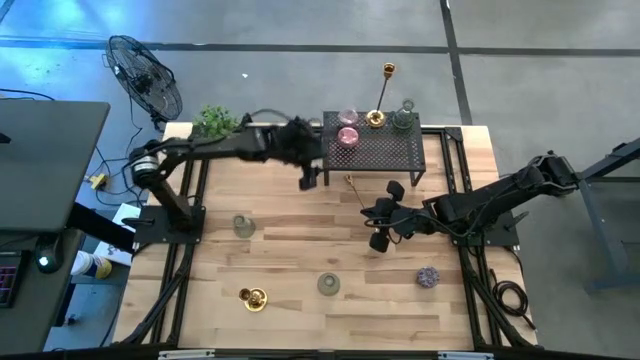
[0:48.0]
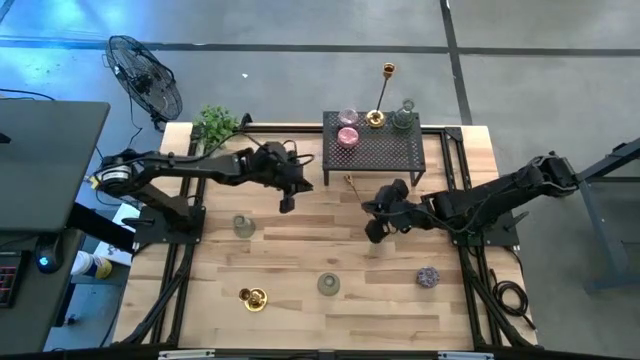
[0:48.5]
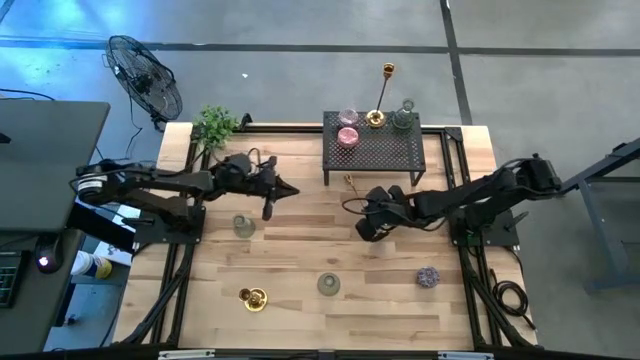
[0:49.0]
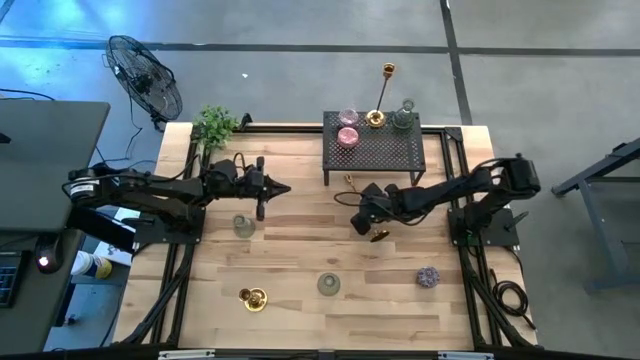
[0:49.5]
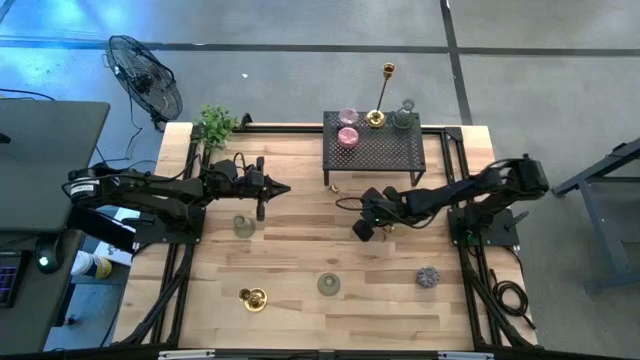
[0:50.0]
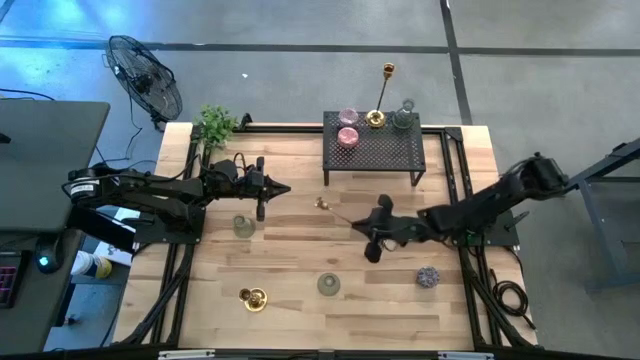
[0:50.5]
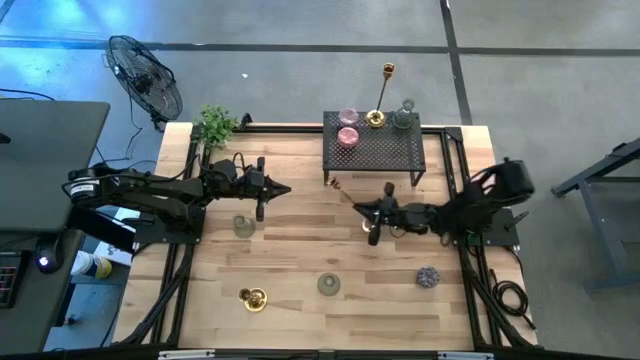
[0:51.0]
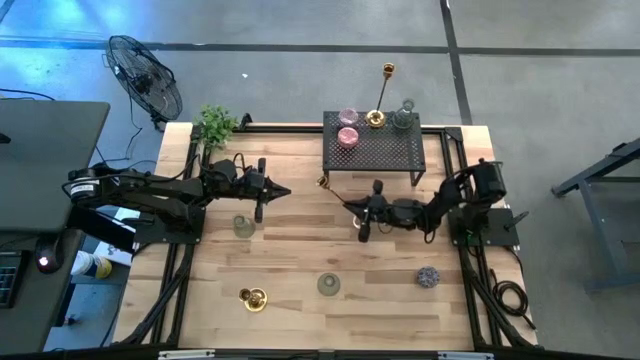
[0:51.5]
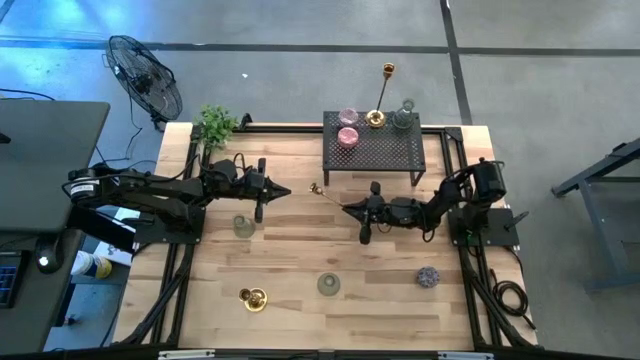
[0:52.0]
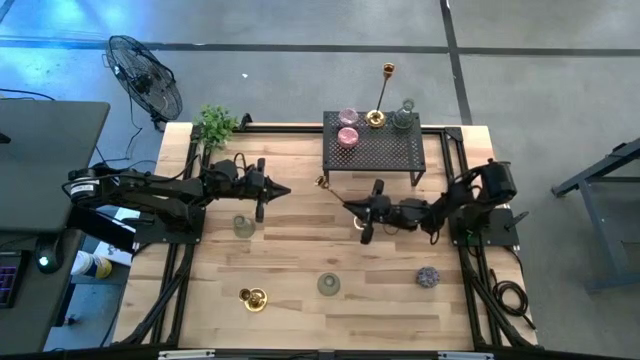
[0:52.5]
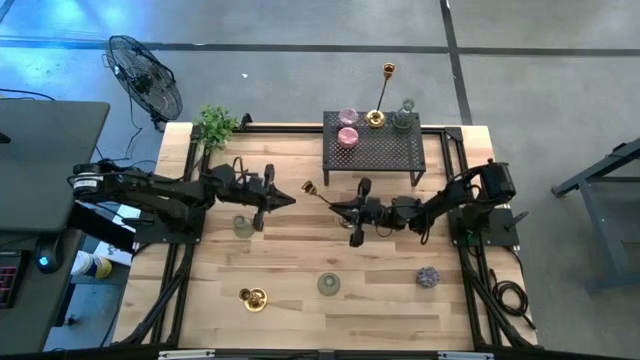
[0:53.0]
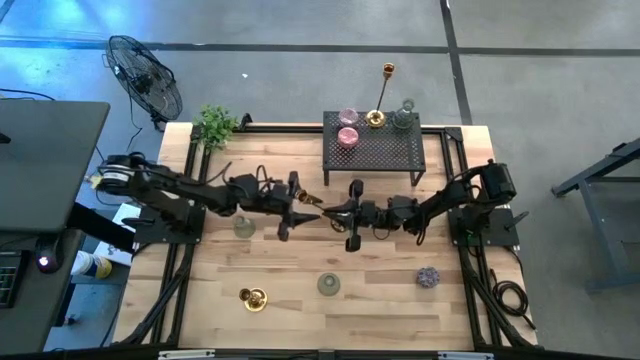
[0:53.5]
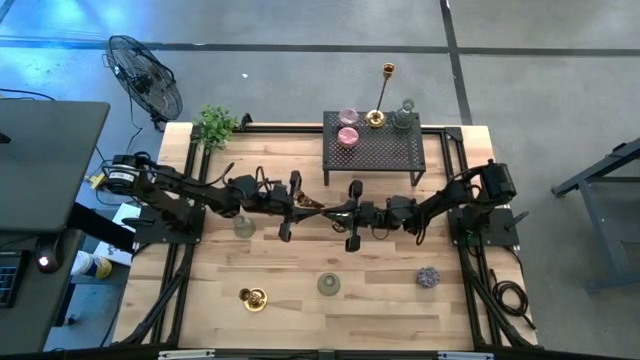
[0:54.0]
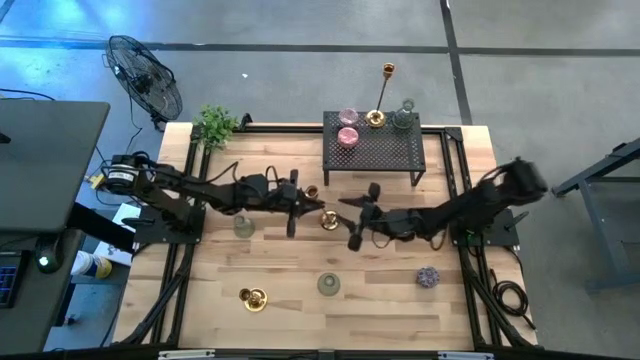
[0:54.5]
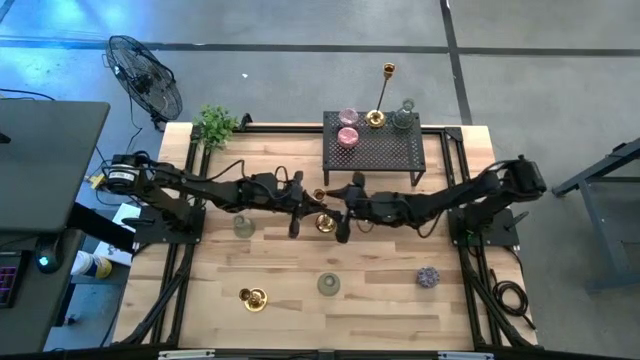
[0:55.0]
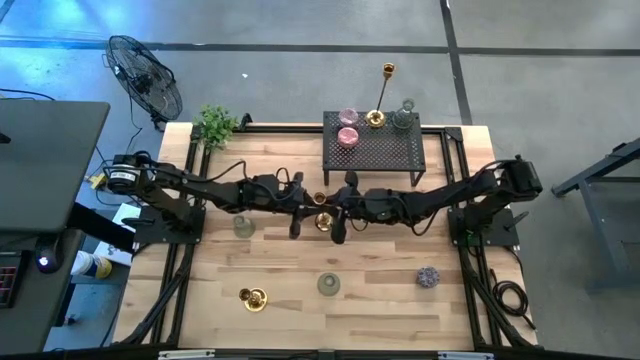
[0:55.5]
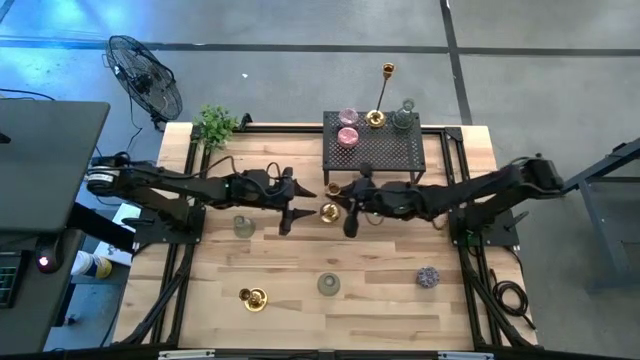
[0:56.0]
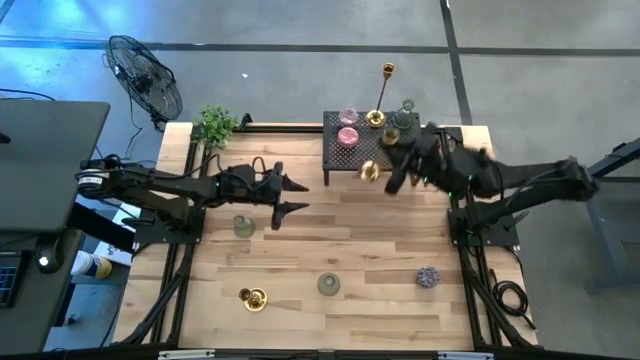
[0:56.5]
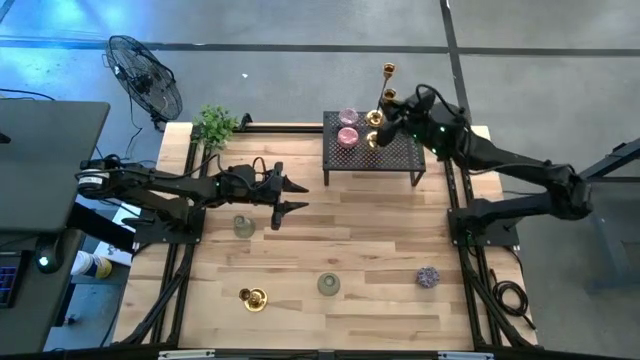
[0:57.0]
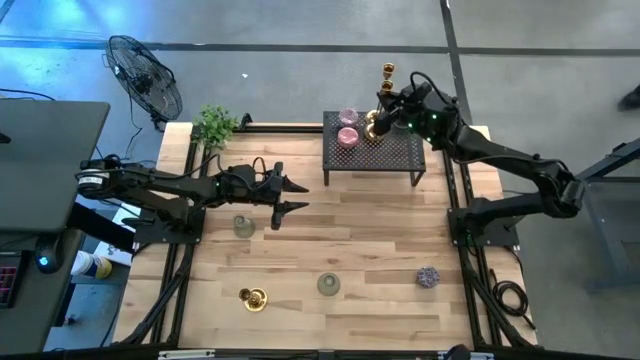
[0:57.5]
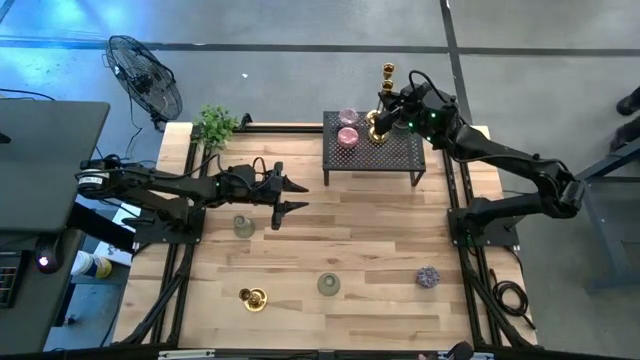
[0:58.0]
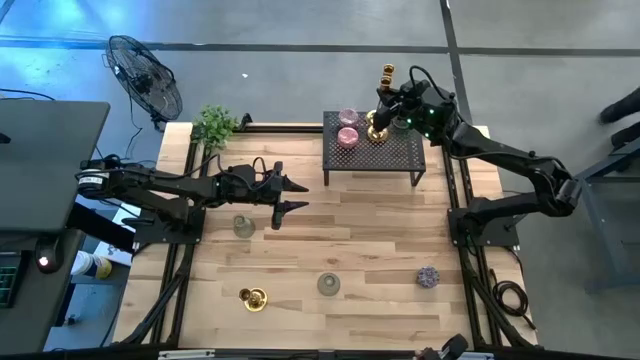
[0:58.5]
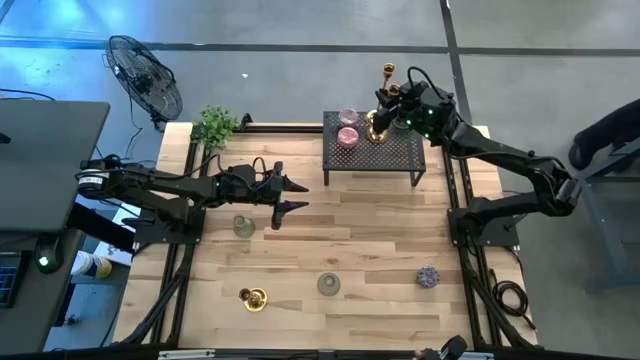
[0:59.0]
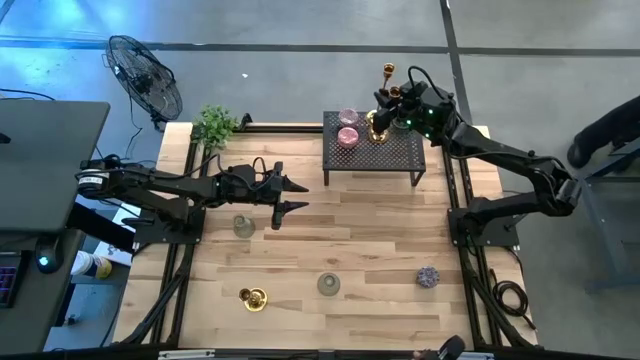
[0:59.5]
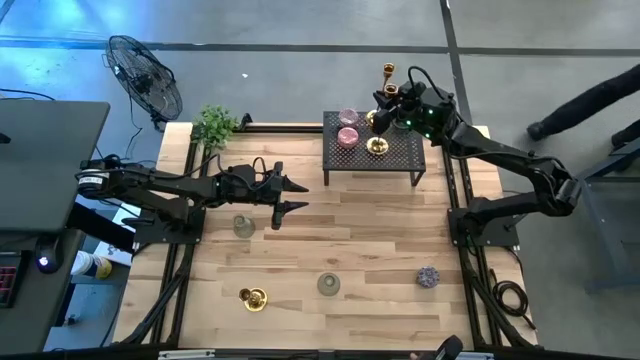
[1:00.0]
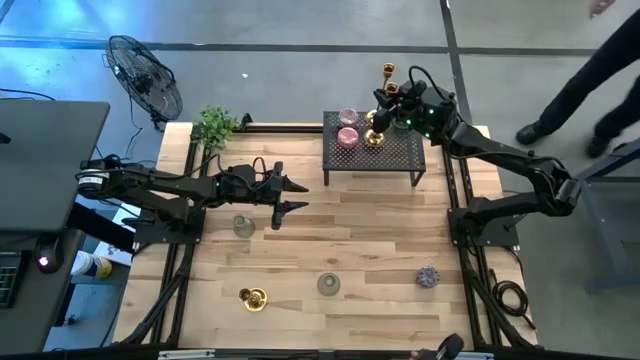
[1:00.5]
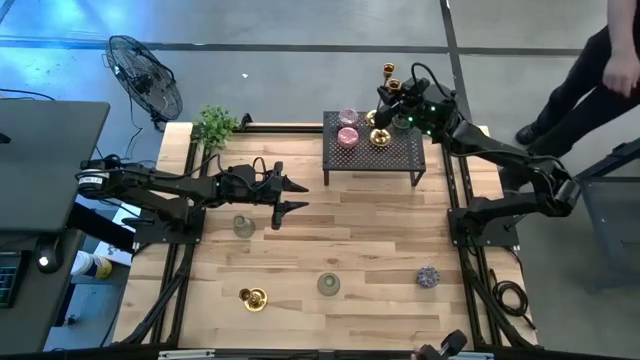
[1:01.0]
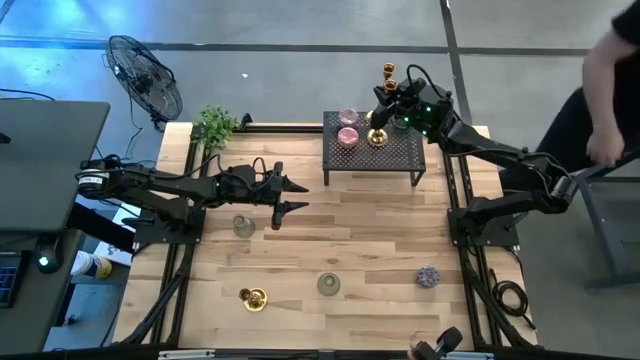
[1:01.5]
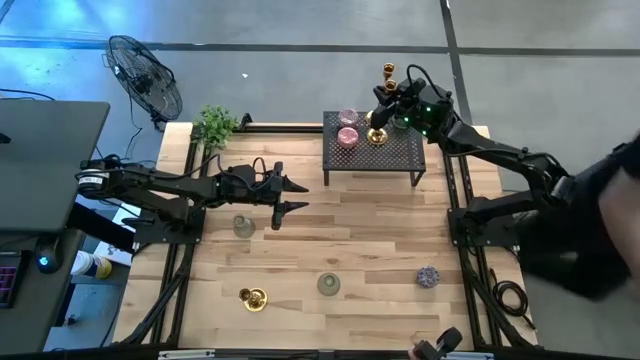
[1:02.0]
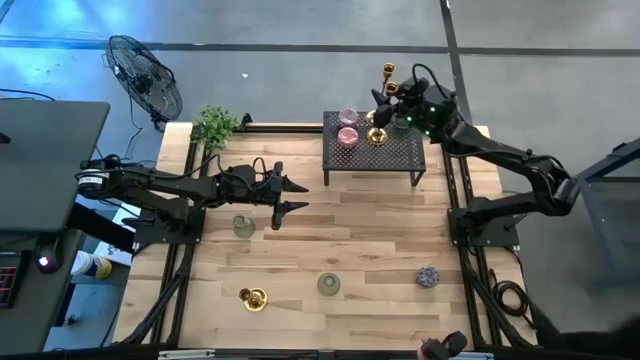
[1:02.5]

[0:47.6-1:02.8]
Task: Pick & Place candle stick holders
Put the top gold candle holder on the shelf aligned with the other gold candle holder

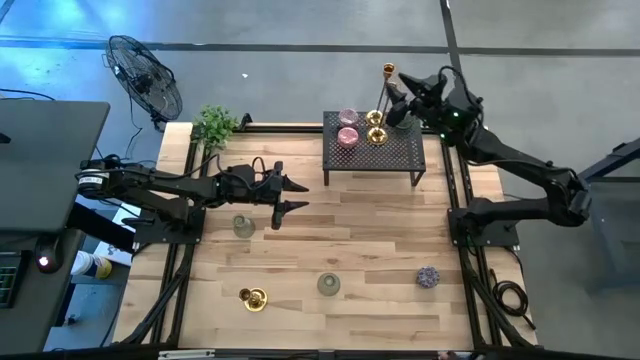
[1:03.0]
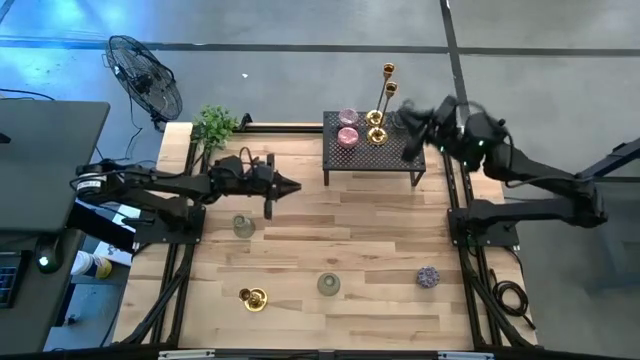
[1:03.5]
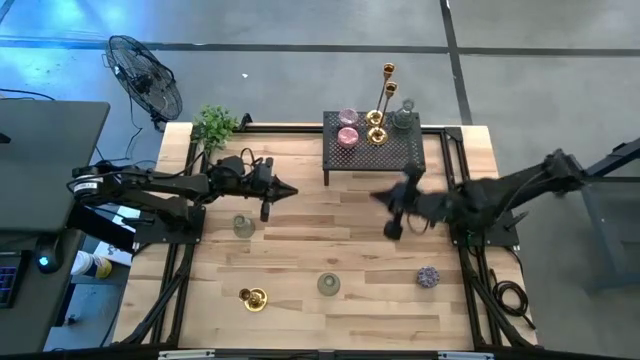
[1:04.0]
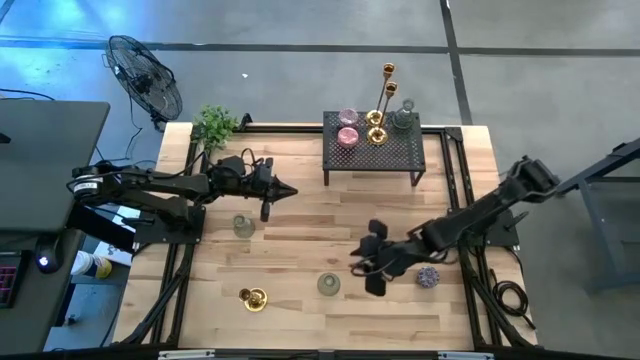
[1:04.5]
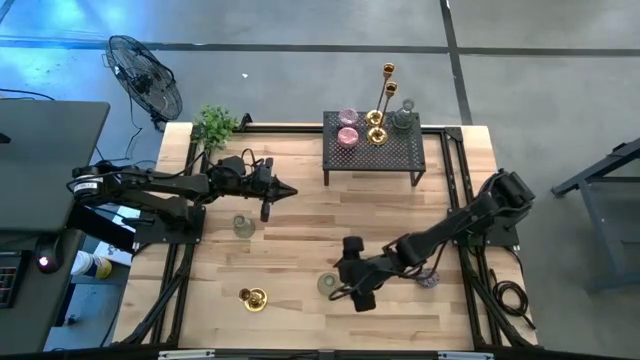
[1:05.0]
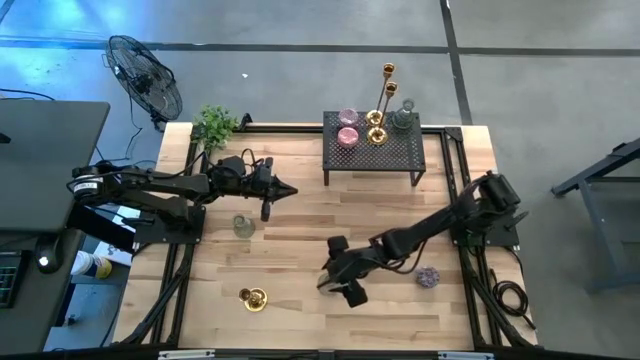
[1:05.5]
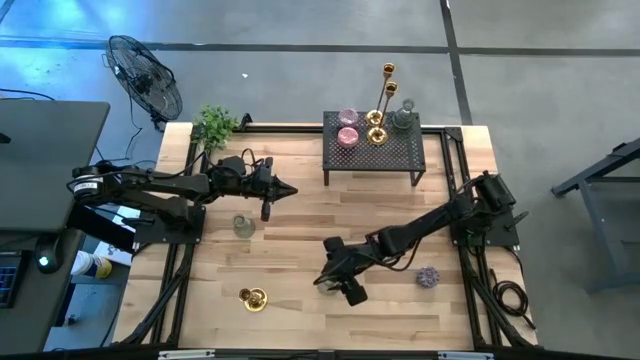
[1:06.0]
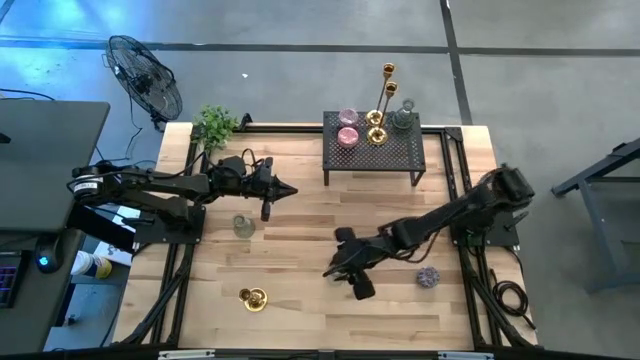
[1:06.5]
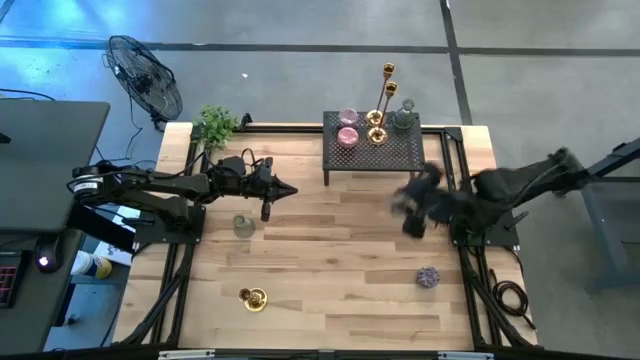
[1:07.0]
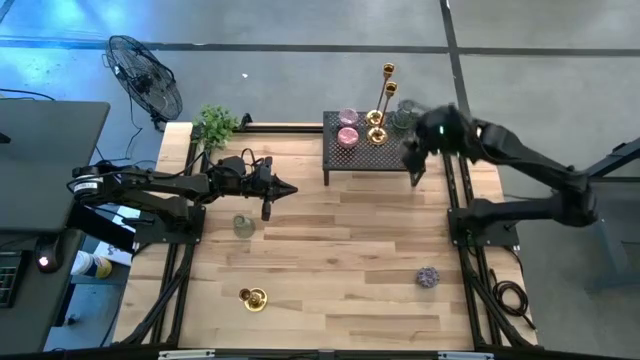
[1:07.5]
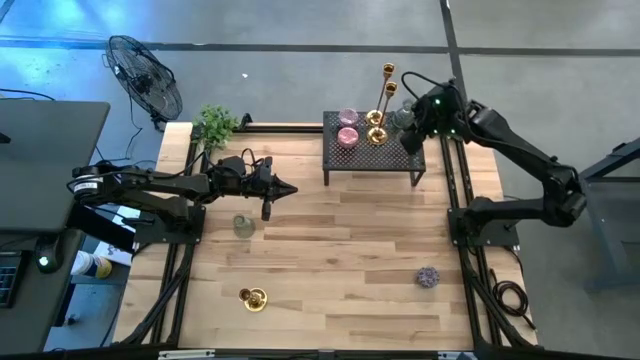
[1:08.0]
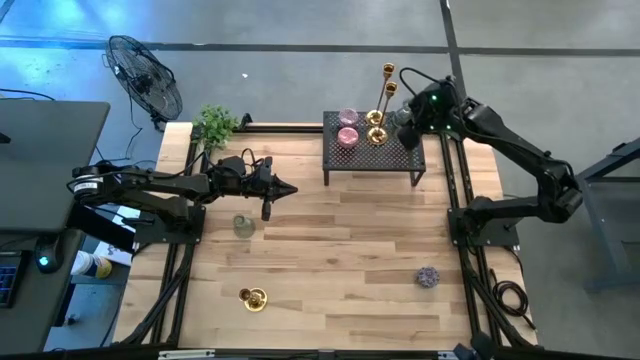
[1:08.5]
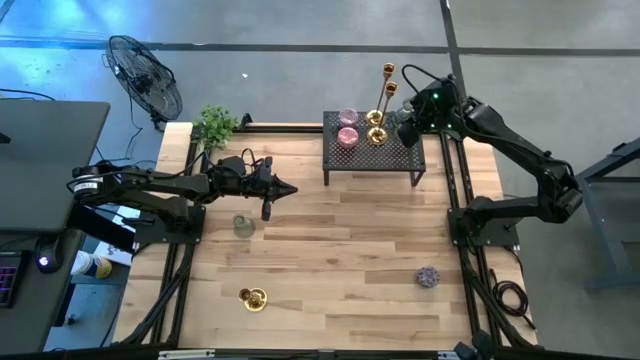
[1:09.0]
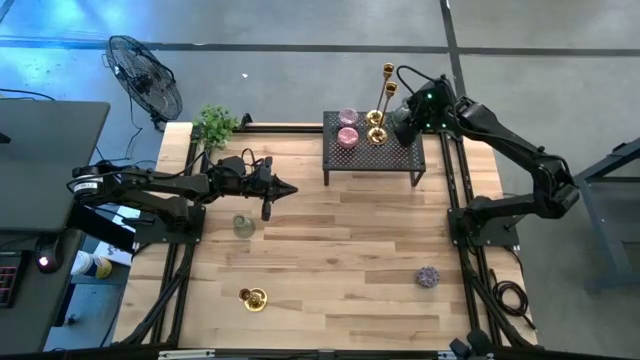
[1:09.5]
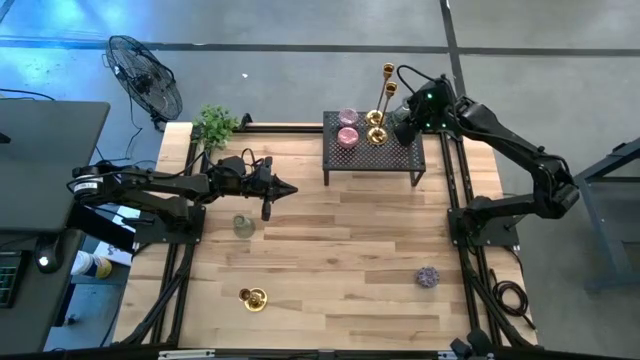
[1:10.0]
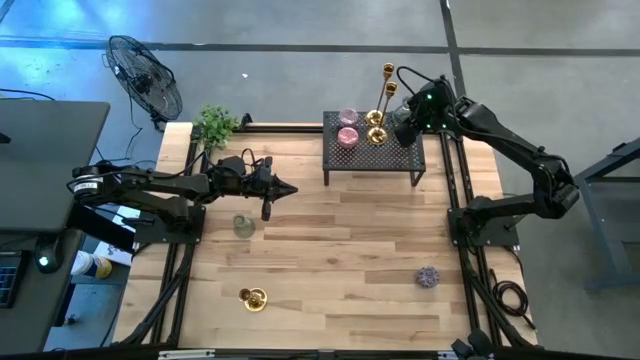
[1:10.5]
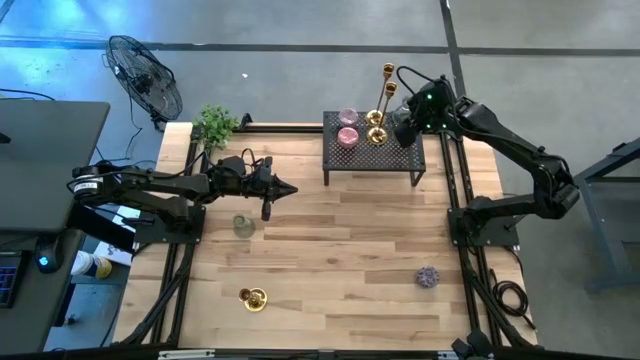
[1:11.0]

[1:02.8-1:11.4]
Put the bottom transparent candle holder on the shelf aligned with the other transparent candle holder
